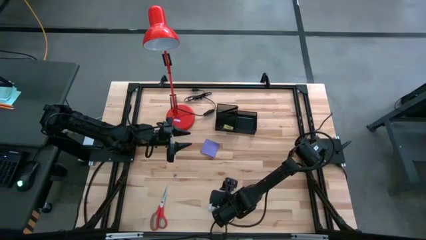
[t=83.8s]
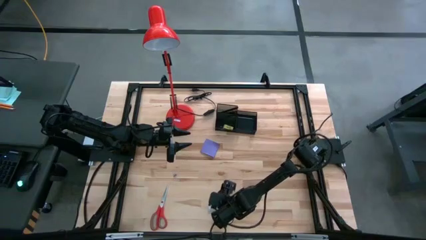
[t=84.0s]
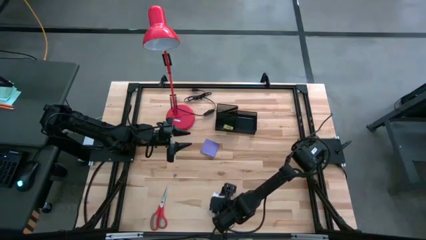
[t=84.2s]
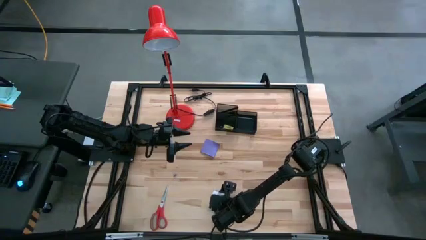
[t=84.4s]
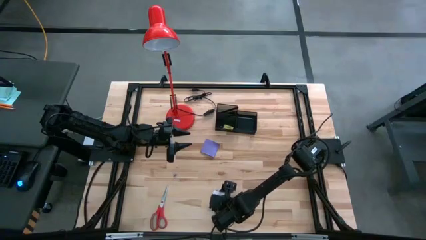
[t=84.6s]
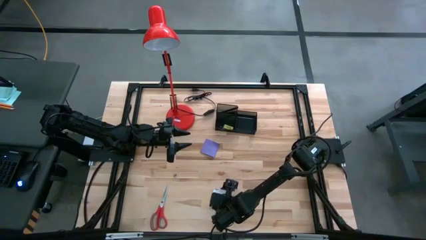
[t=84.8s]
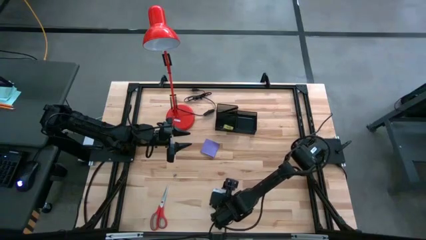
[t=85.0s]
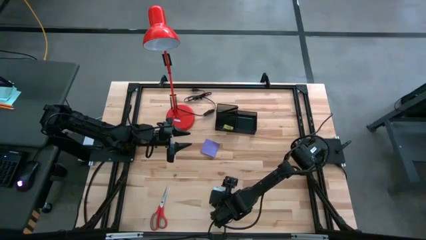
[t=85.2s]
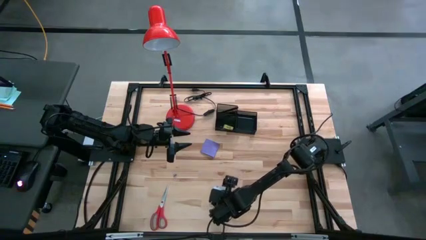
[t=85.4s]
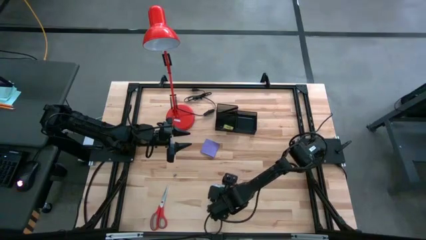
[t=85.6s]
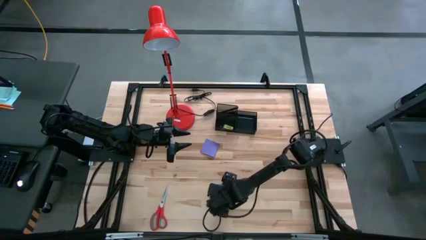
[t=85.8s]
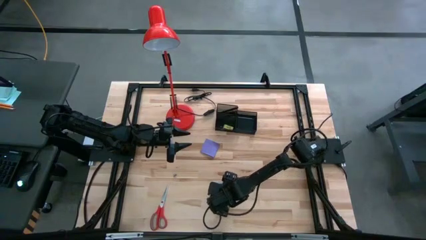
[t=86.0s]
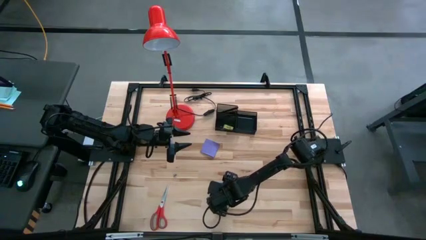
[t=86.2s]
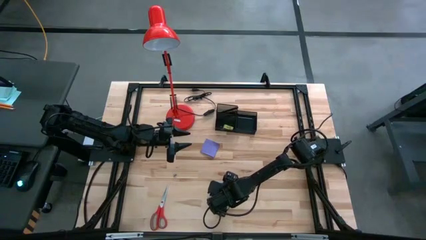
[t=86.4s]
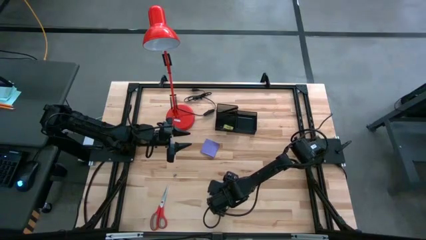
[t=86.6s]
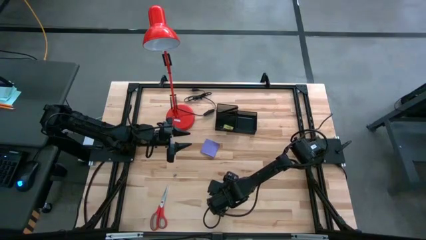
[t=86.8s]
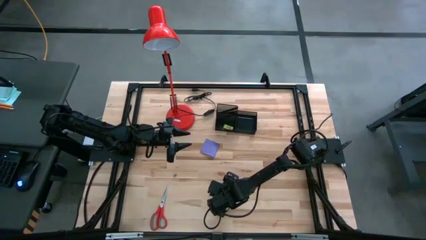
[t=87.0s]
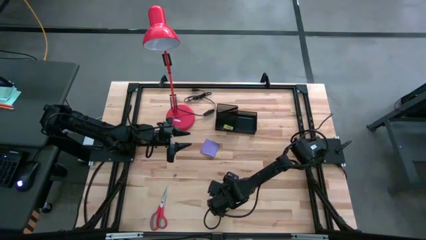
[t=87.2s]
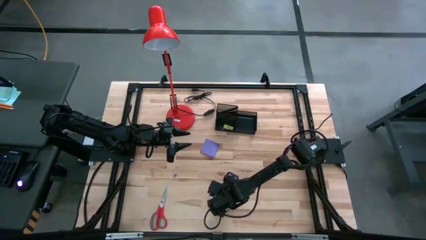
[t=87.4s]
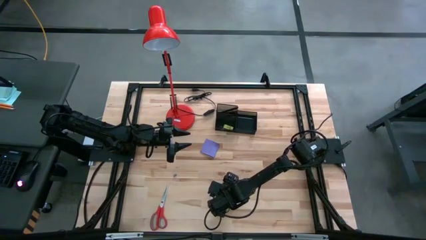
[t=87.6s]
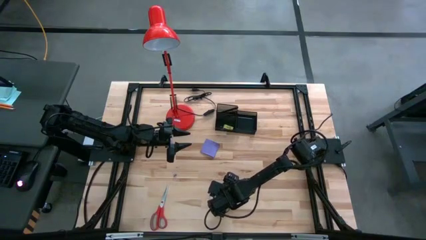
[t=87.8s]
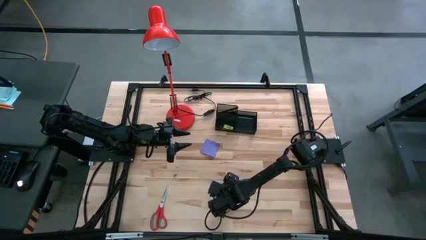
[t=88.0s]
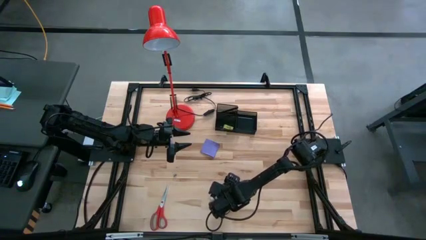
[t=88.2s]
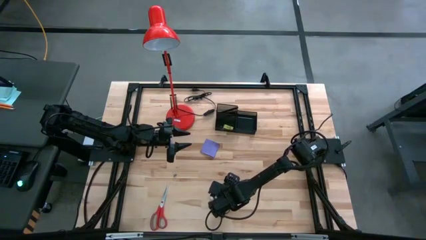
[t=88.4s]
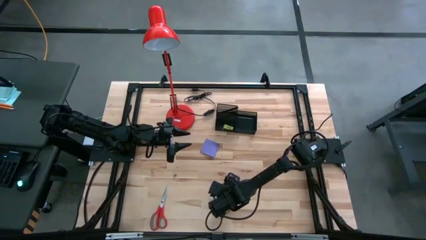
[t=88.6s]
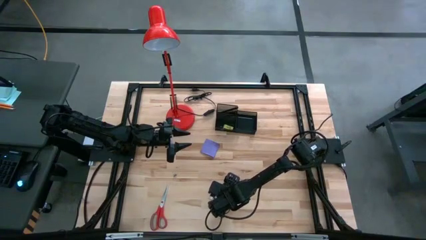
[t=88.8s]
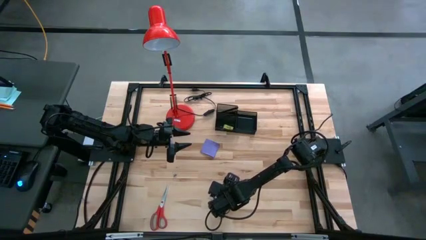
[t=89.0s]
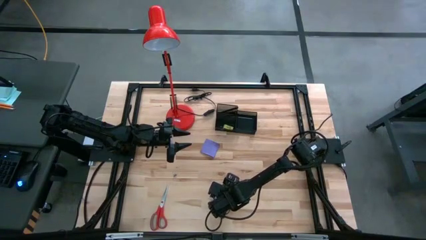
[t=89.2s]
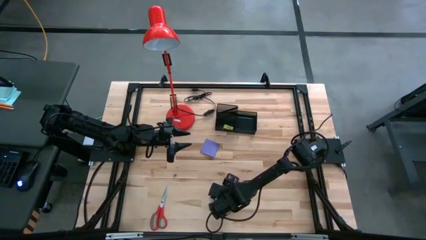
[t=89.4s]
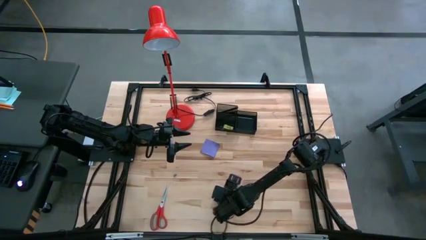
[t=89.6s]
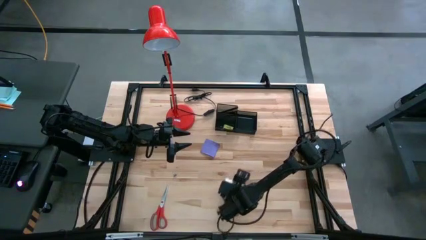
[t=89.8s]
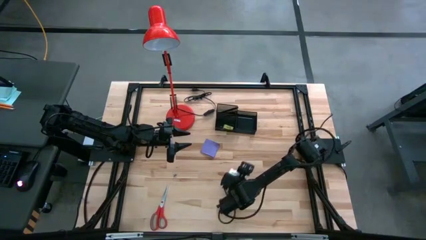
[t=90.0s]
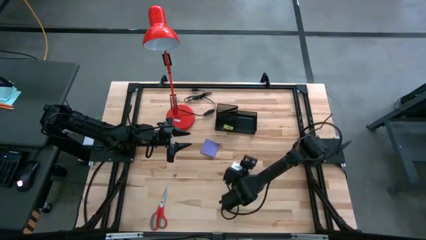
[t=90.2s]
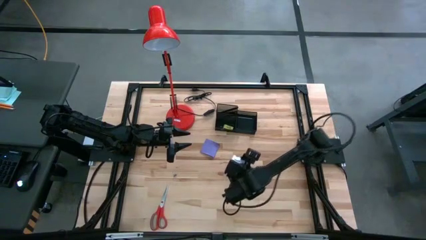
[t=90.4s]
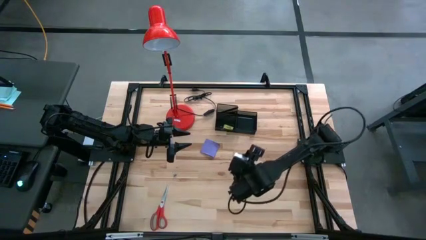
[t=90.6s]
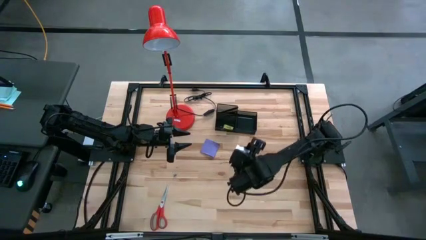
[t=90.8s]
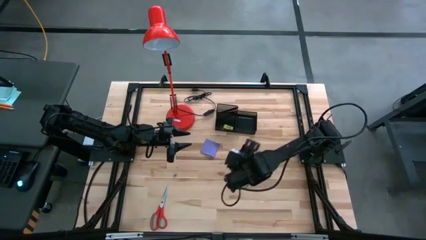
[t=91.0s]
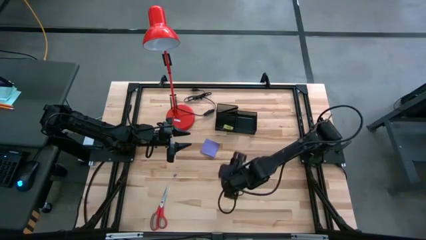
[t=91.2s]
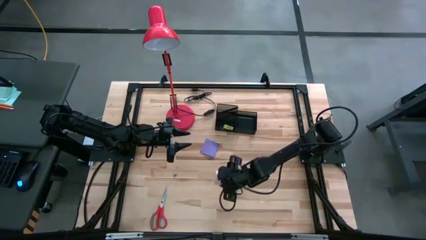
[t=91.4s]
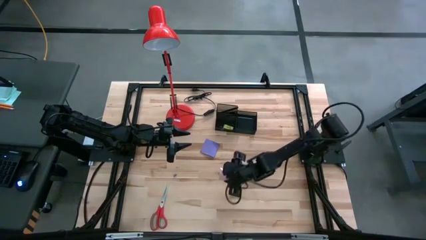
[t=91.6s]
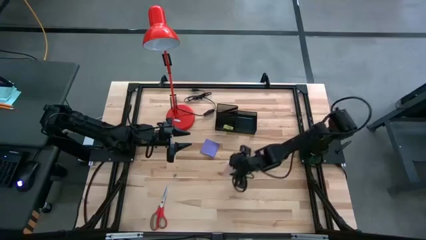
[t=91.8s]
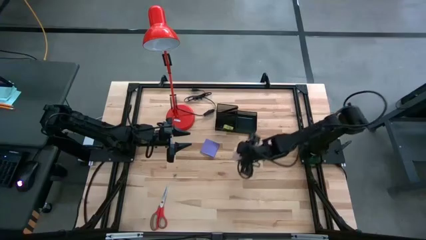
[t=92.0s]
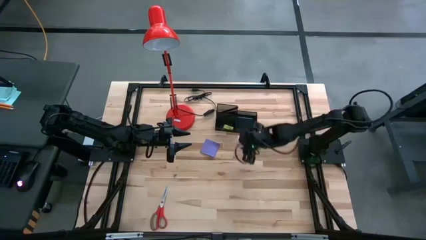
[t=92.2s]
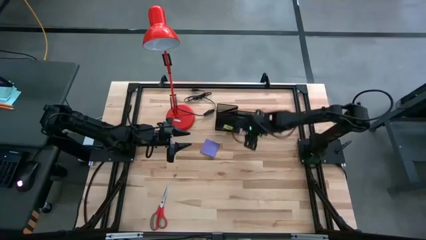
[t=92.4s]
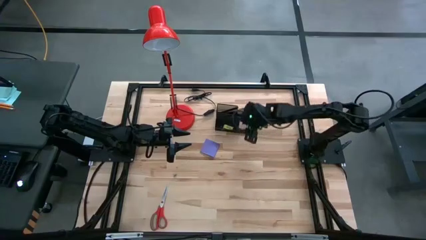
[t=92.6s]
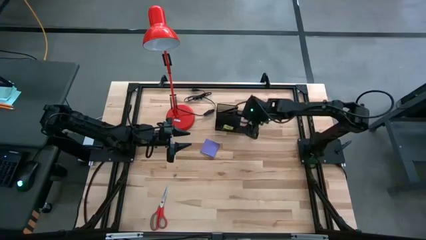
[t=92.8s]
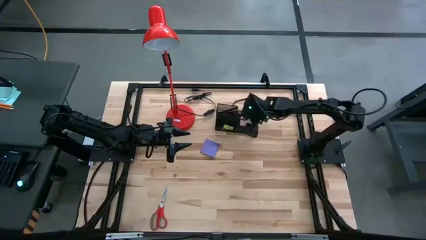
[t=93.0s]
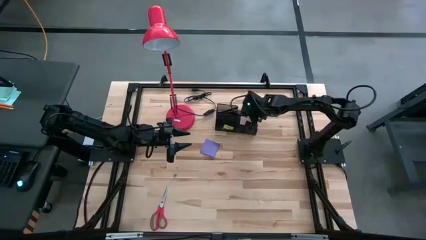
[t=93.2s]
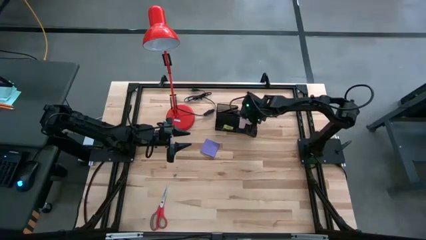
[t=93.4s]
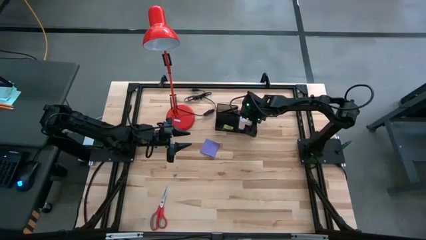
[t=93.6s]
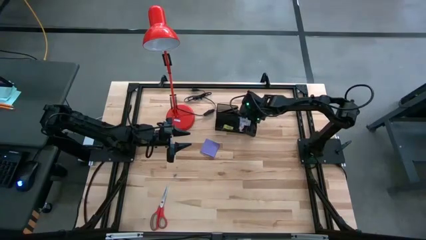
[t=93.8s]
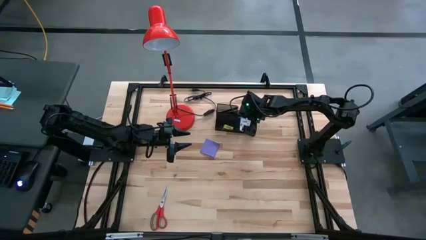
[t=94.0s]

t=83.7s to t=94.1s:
Task: Pick and place office supplies into organizer
Put the white sticky notes into the black desk organizer
